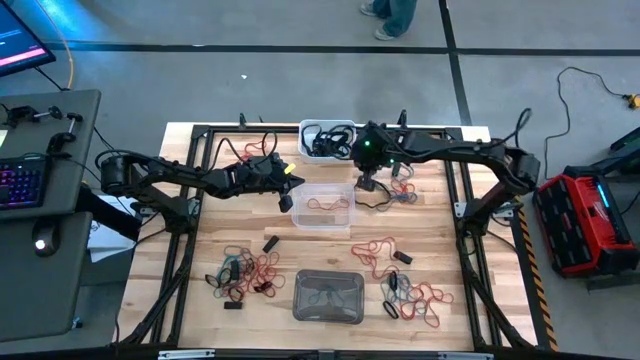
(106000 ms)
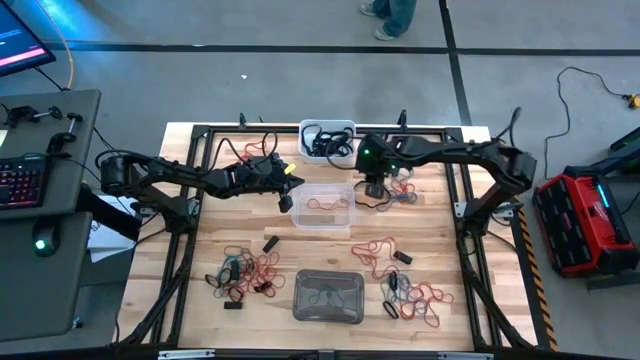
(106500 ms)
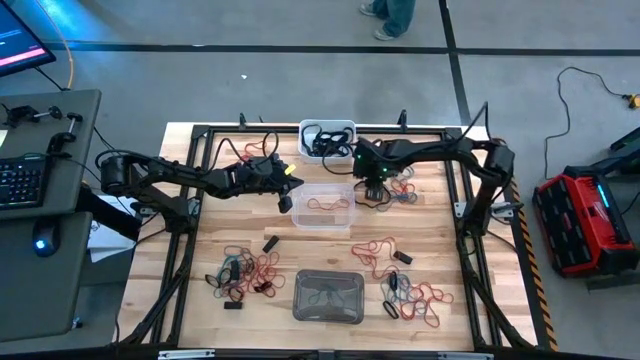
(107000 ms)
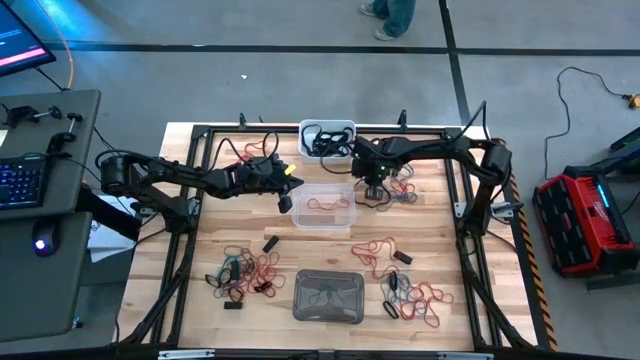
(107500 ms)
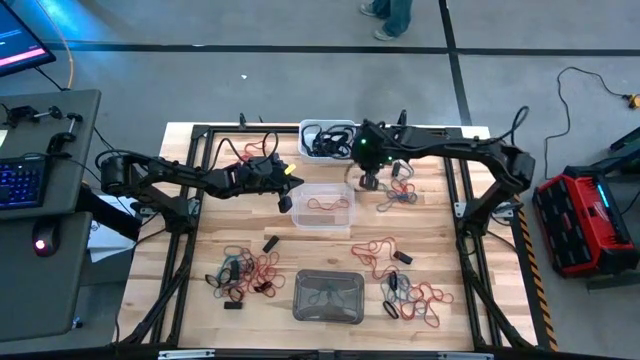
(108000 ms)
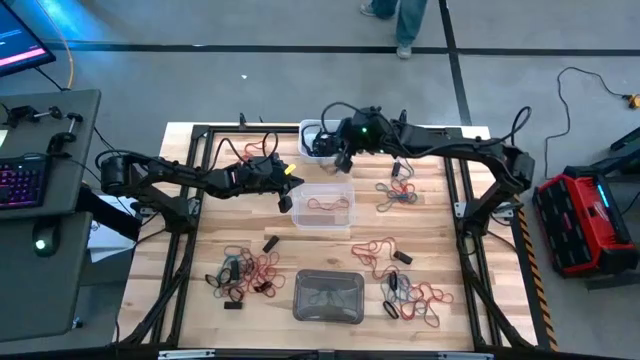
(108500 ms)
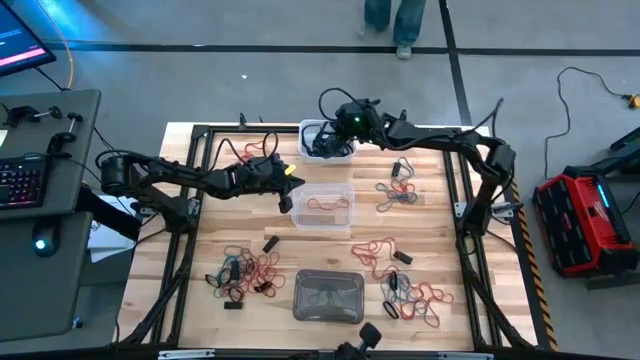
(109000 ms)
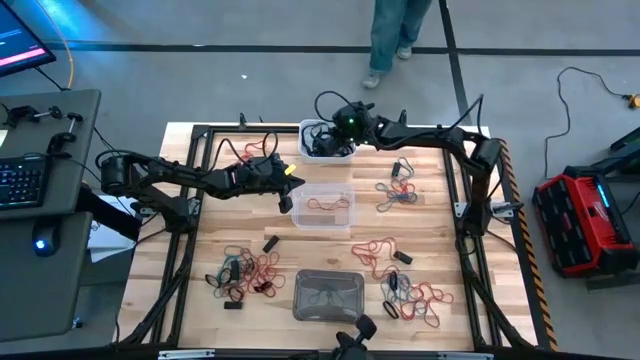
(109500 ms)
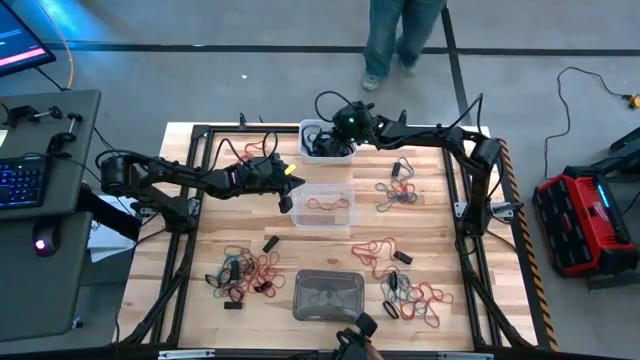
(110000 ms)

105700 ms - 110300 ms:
Task: Sort rubber bands into baskets
Put the black rubber band into the white bin

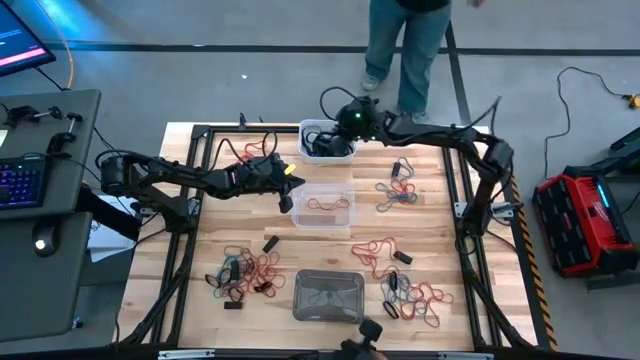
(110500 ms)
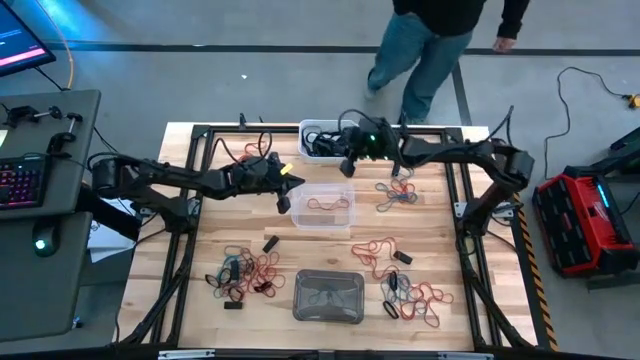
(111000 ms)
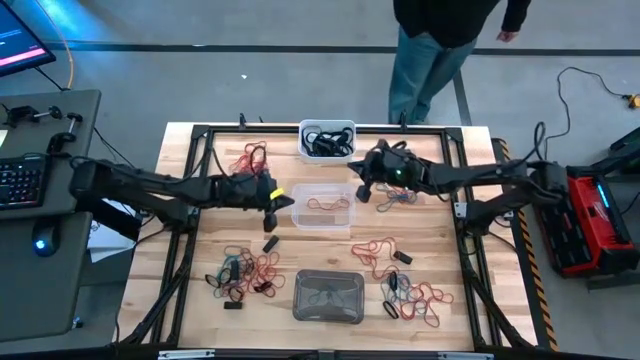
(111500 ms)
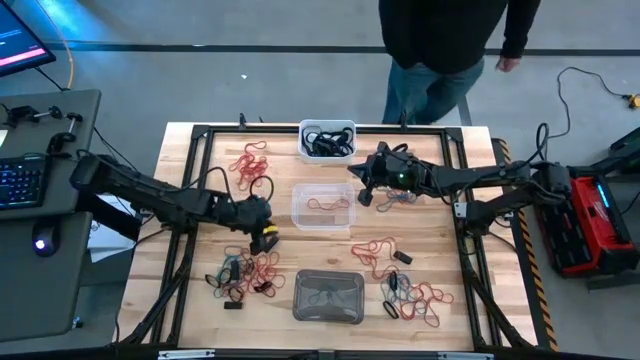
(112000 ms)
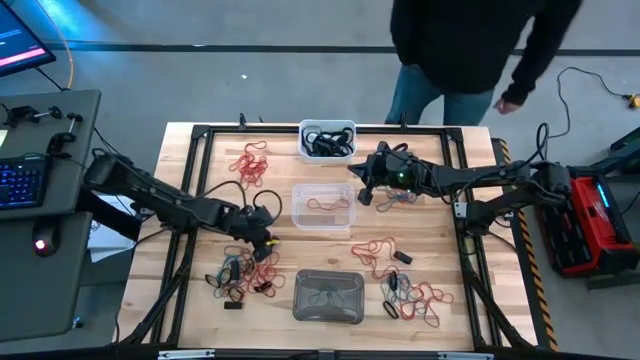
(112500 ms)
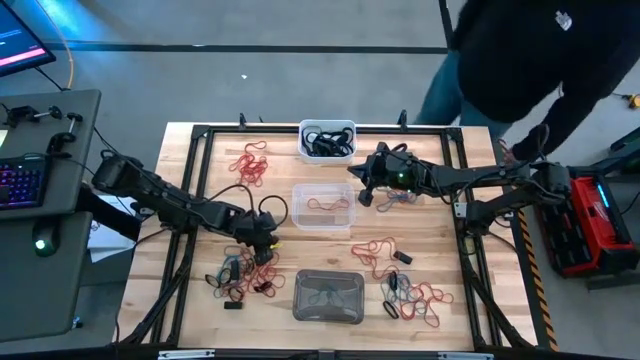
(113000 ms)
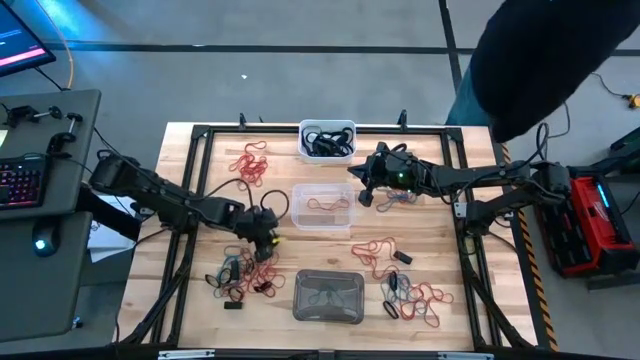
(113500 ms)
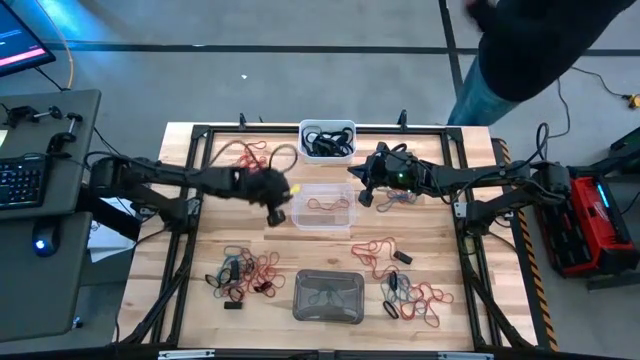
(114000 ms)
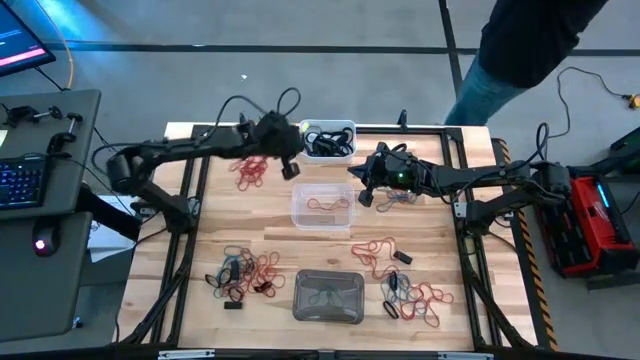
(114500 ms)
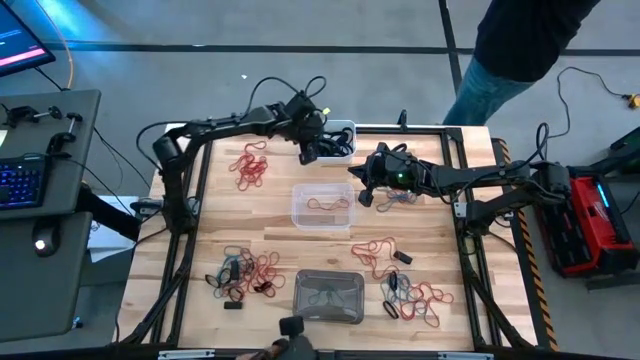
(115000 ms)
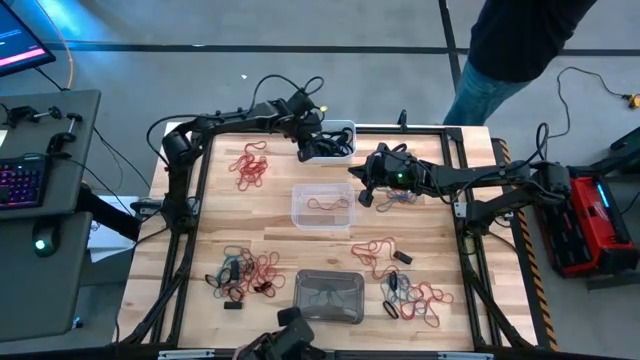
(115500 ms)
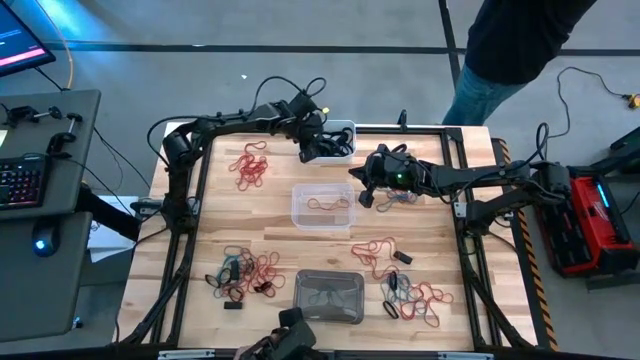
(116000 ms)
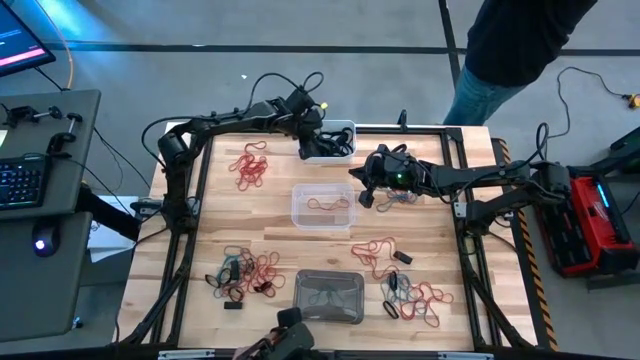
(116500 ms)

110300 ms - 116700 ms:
Put the black rubber band into the white bin

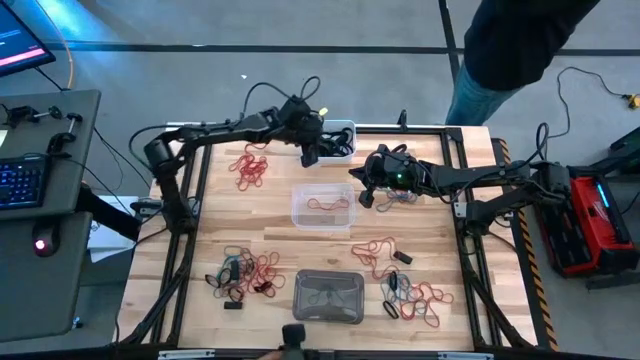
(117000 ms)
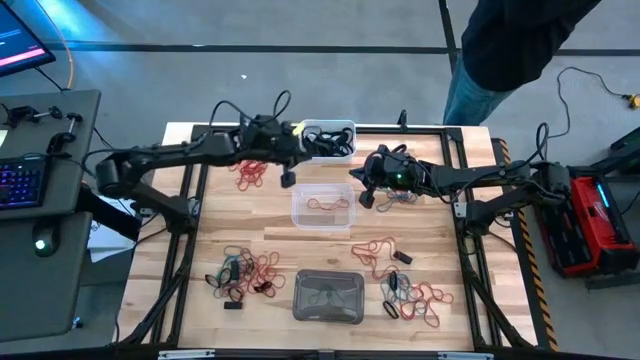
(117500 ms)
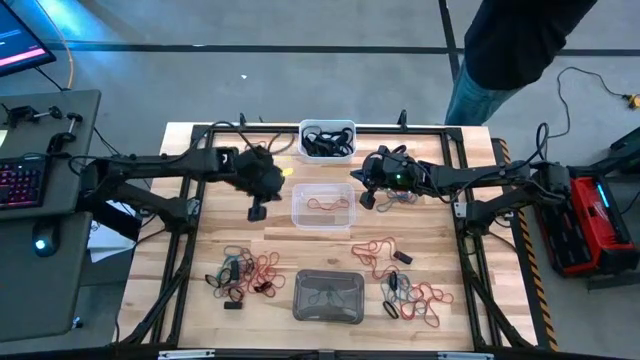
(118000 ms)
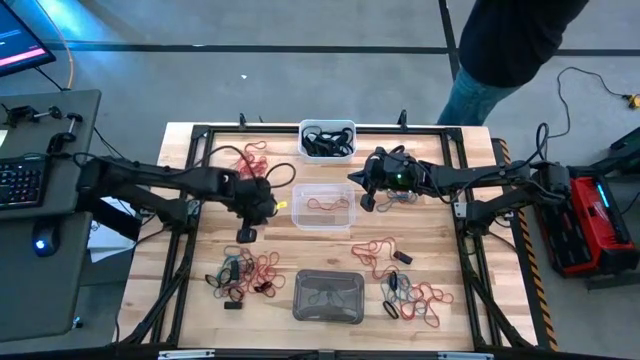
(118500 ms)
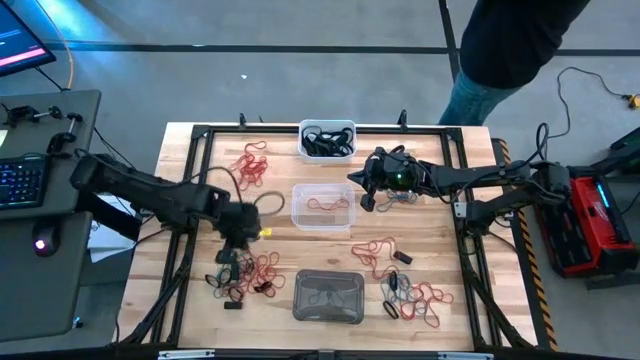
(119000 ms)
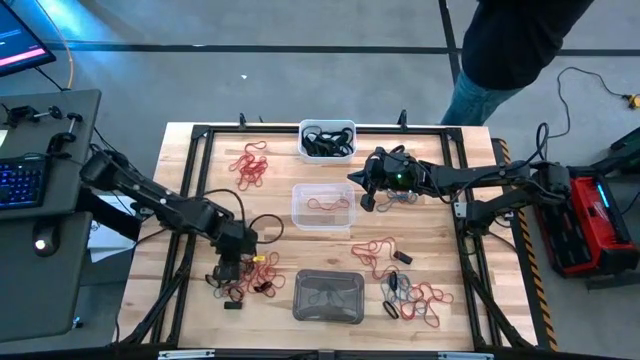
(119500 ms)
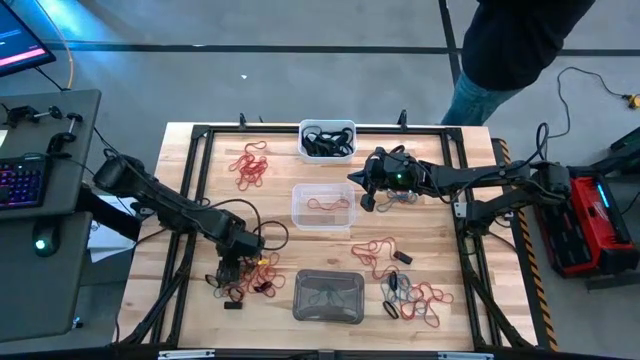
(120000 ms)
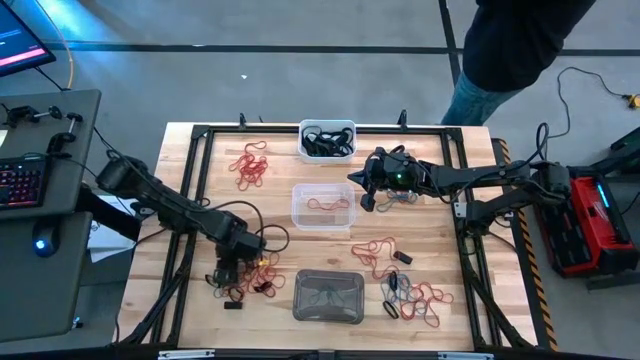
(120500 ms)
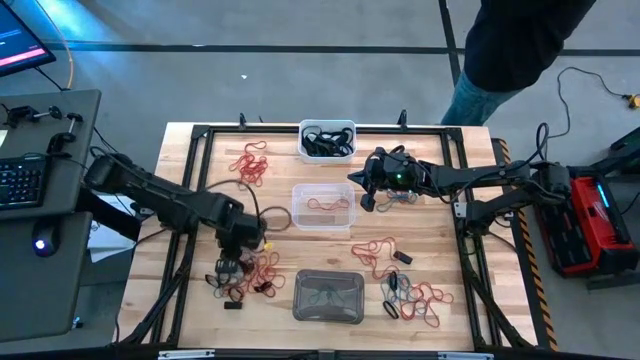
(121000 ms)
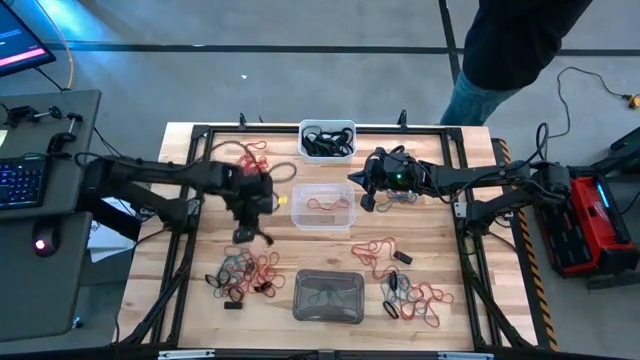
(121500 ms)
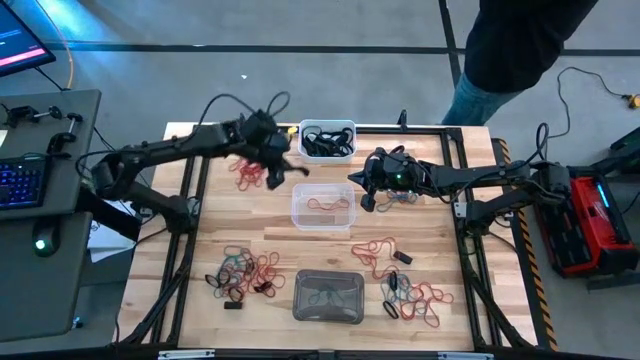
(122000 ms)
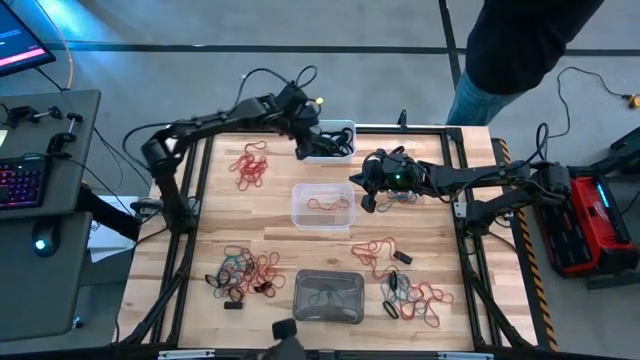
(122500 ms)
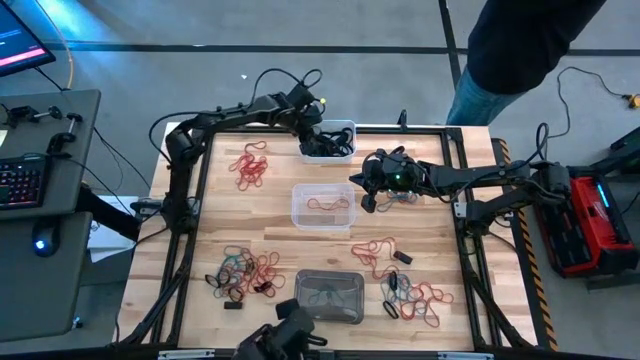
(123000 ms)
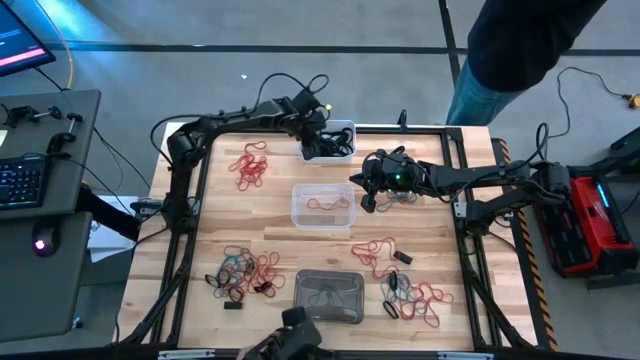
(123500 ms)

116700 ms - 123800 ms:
Put the black rubber band into the white bin

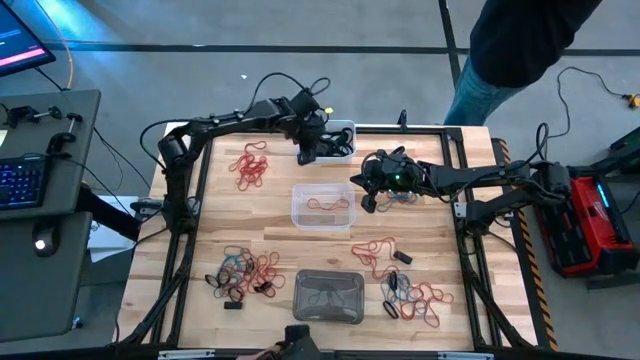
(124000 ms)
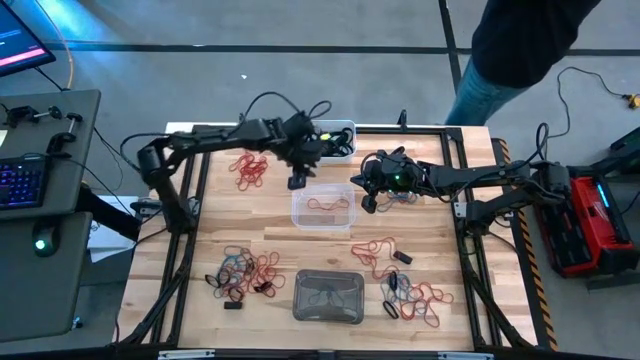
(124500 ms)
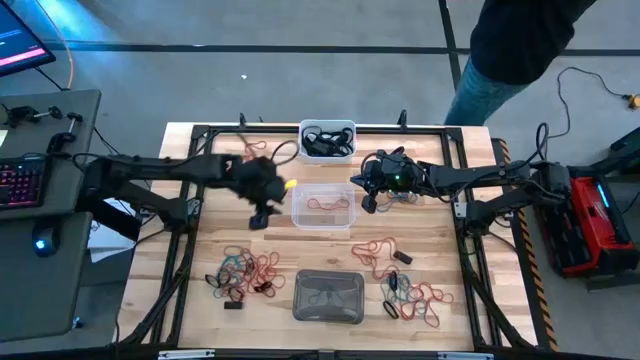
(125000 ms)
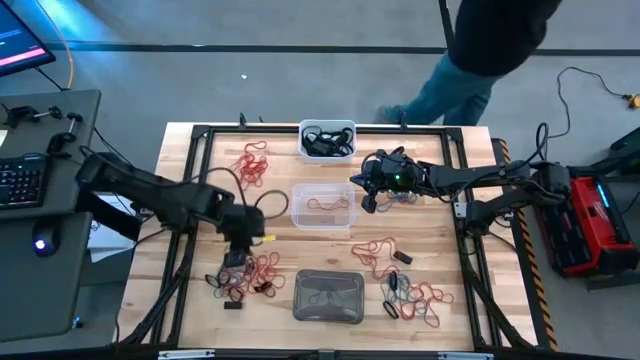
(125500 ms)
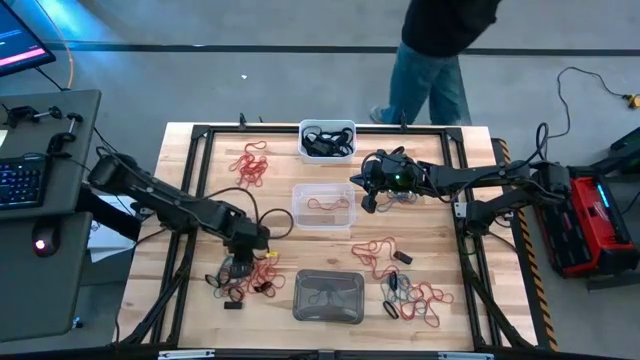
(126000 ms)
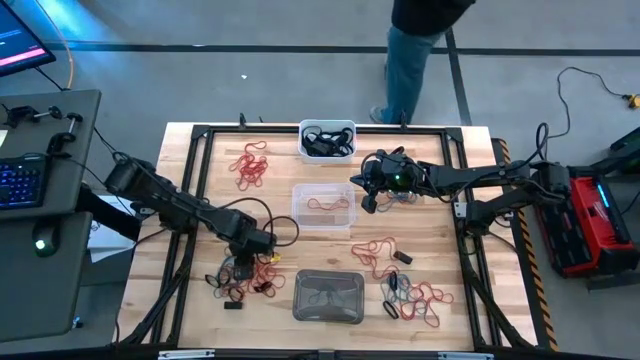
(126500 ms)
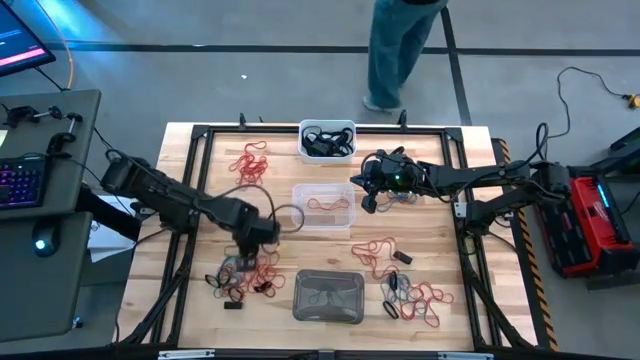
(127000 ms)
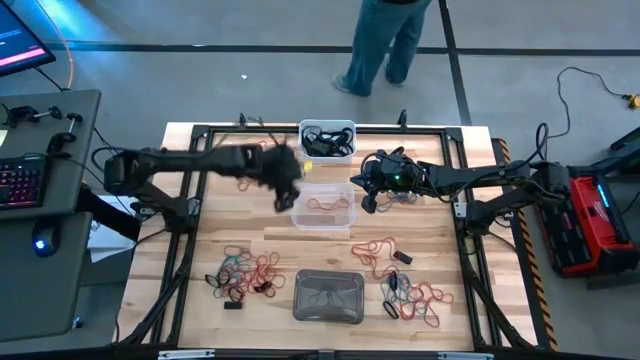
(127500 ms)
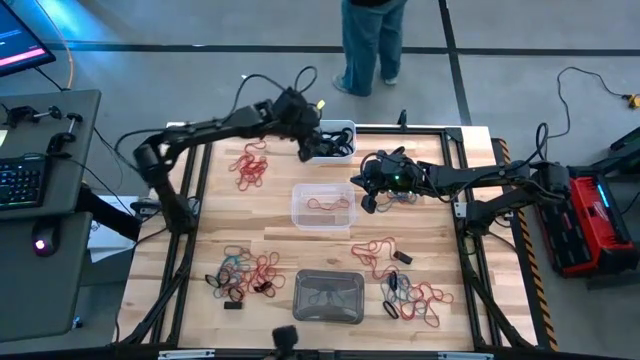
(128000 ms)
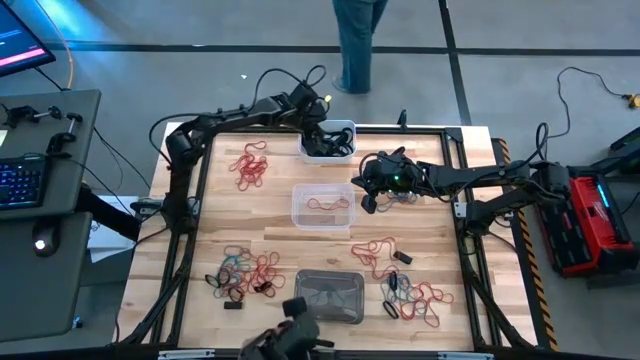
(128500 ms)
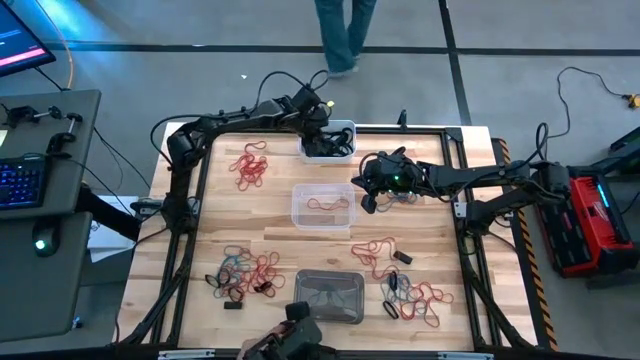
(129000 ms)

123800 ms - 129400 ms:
Put the black rubber band into the white bin
